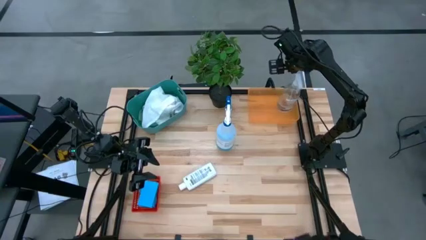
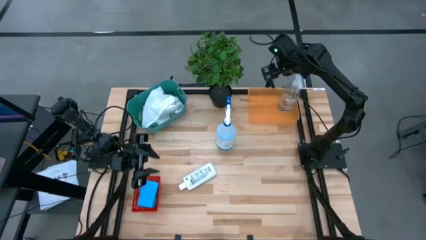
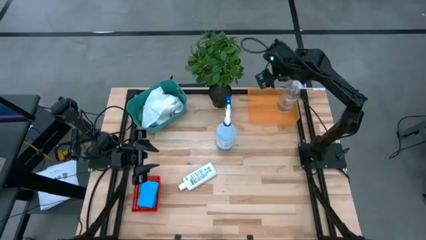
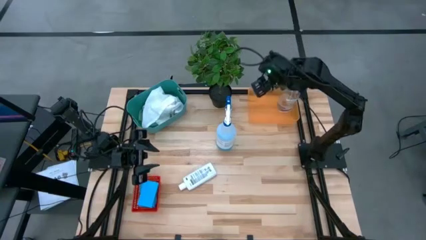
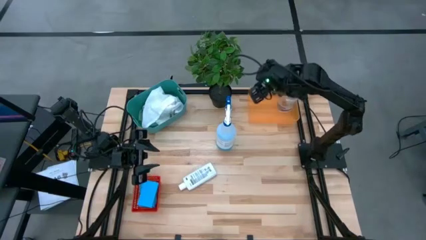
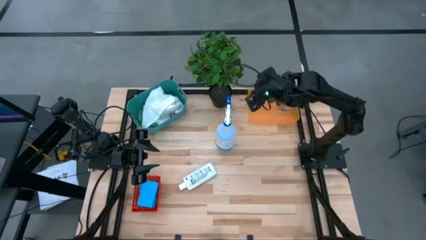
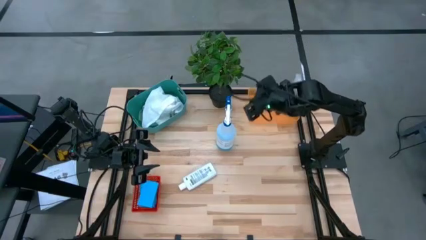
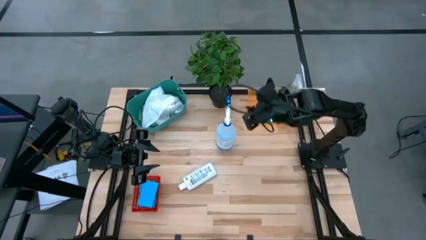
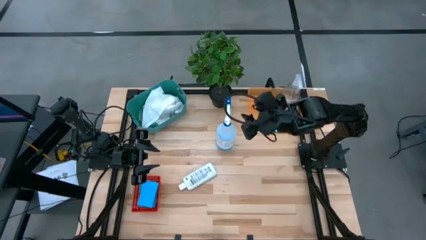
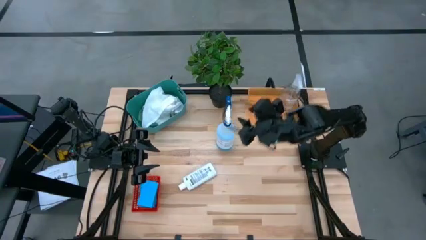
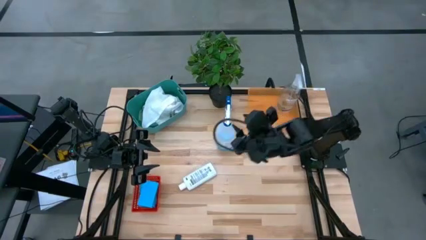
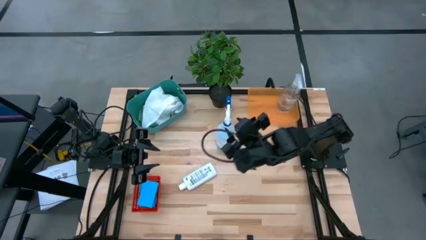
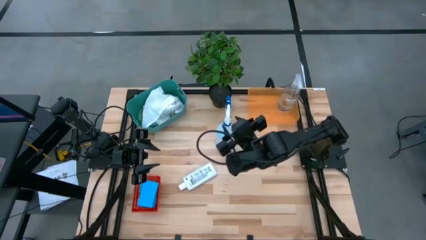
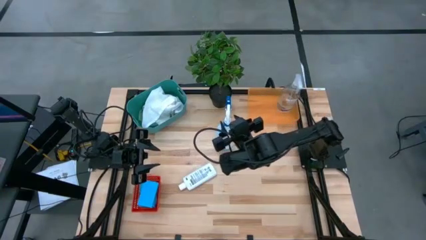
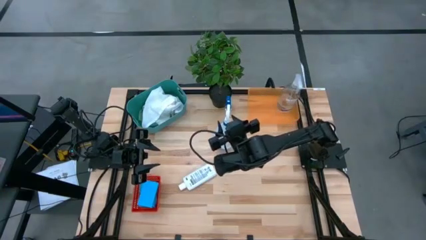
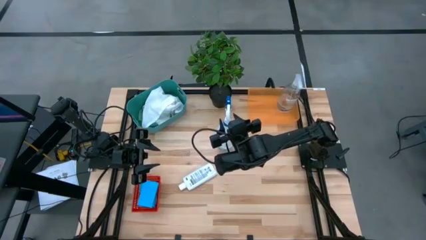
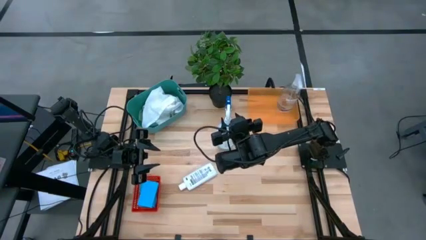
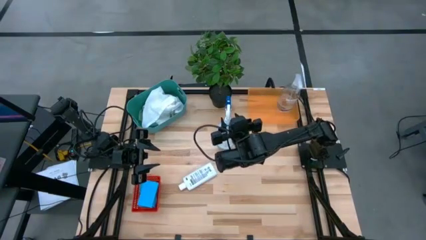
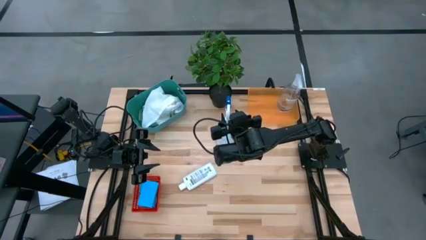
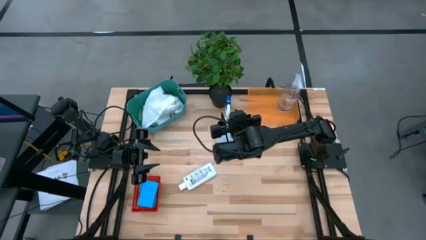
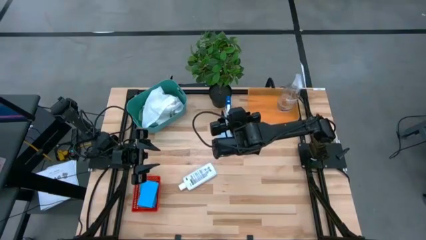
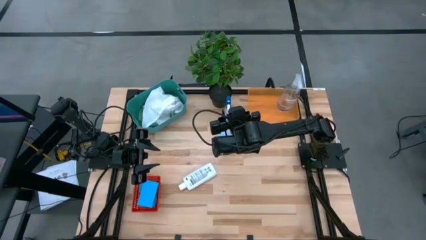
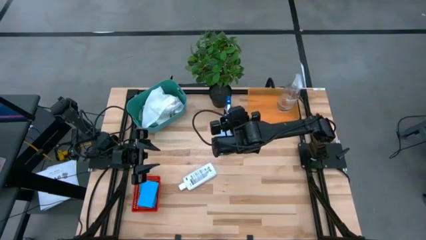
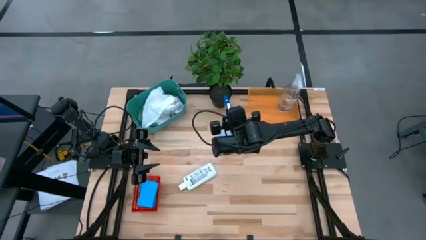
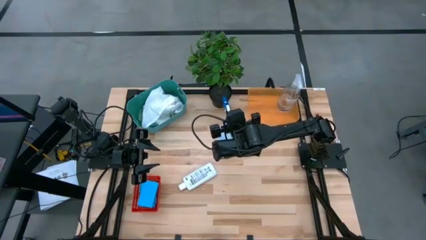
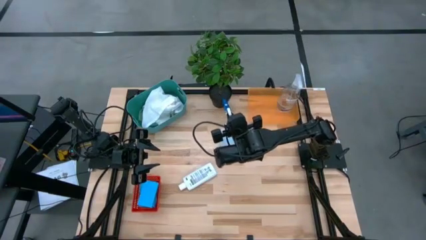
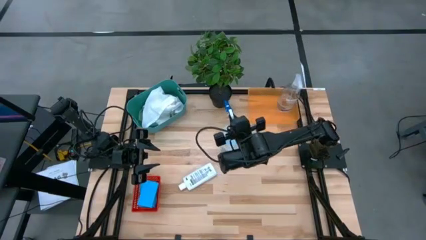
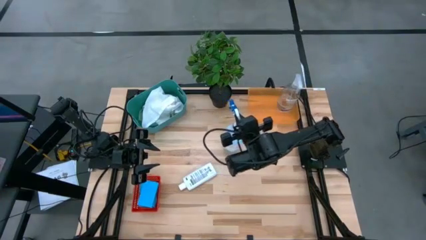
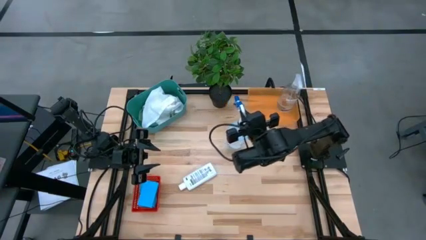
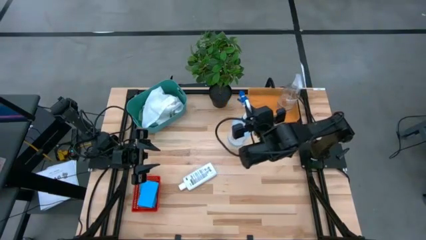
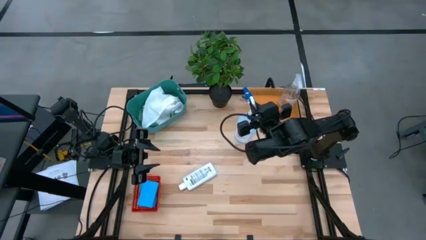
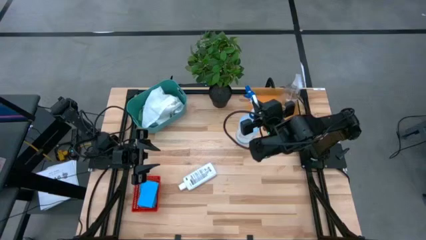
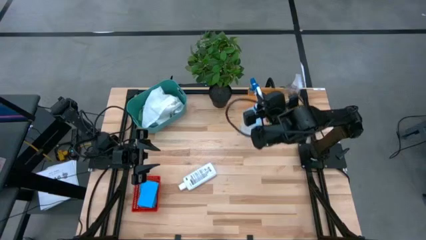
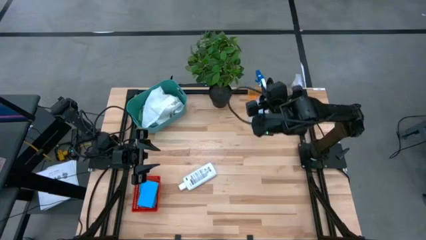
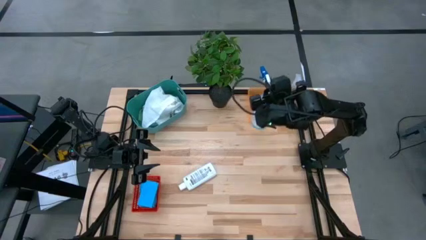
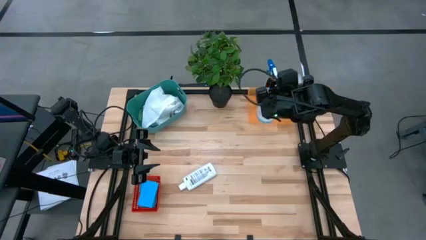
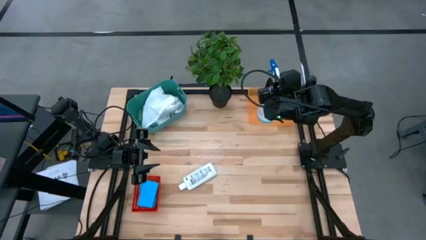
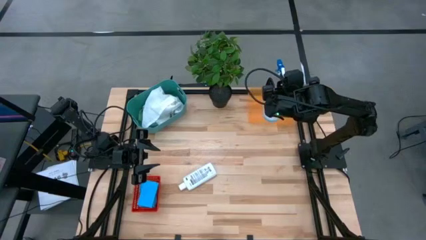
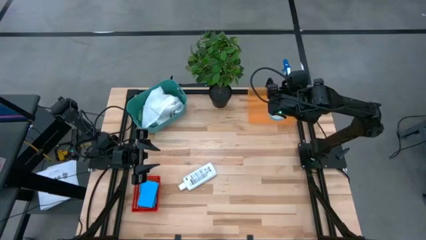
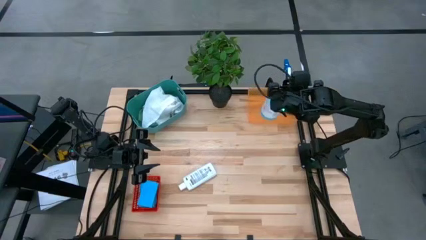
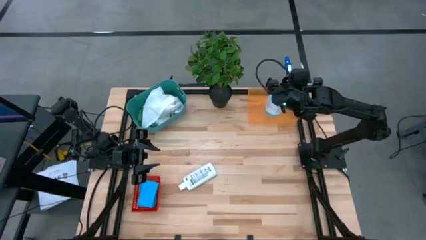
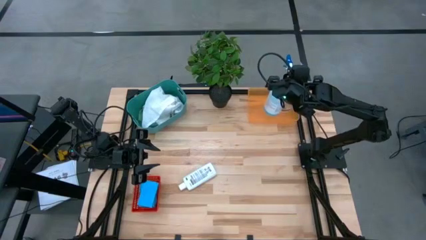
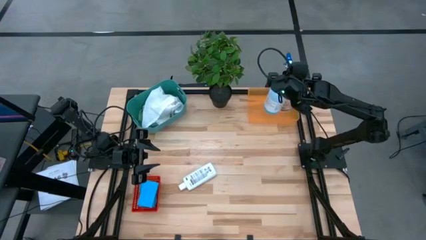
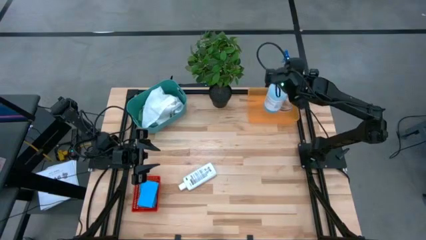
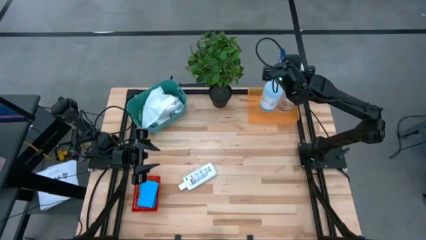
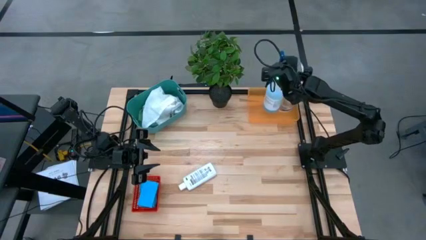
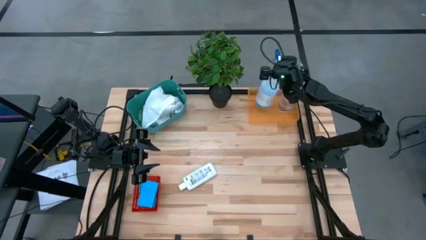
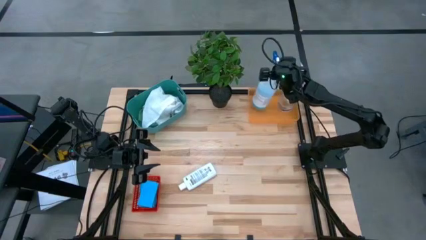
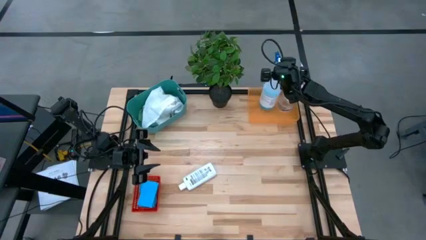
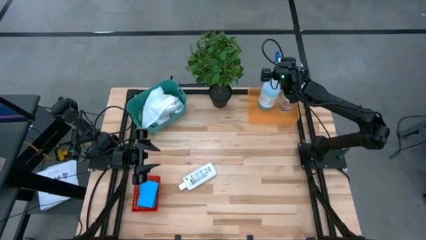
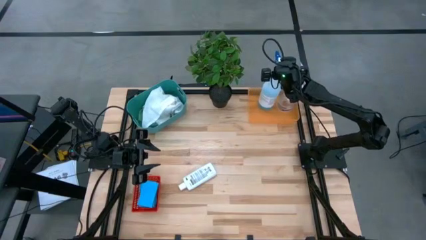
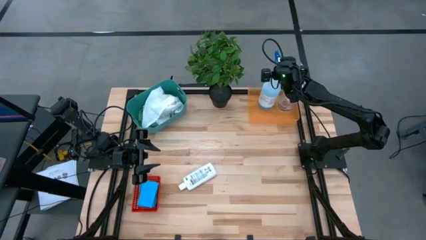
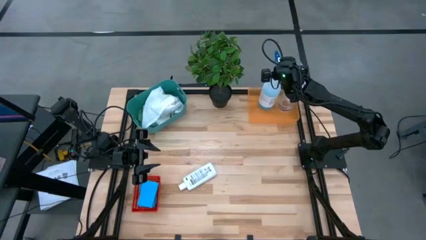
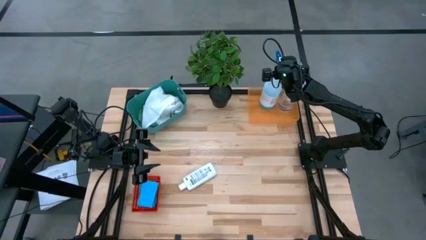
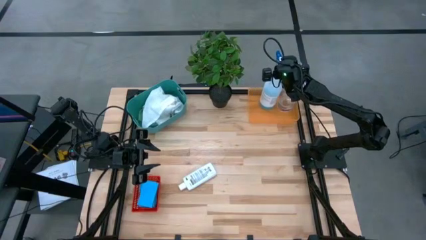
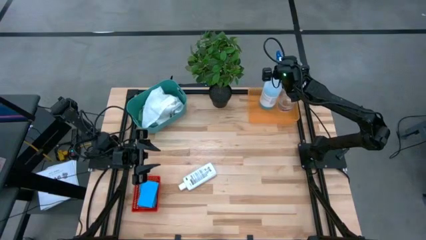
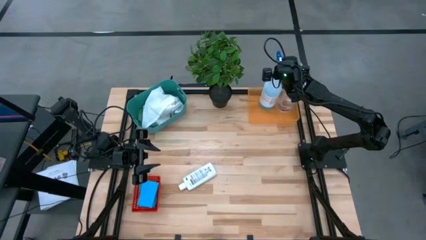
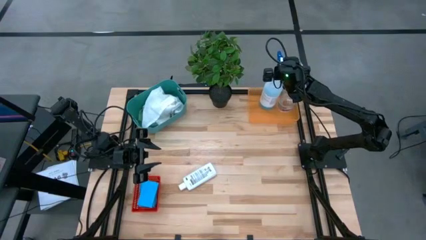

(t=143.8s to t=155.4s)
Task: Pick & Place Kitchen Items
Put the blue bottle into the orange bin

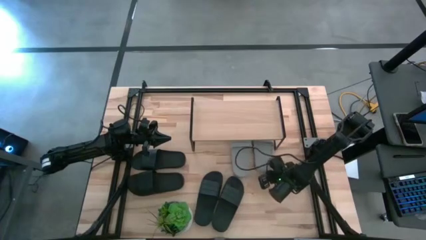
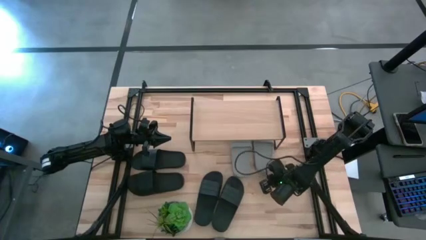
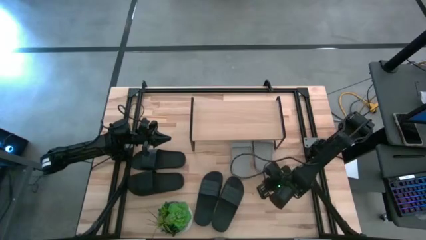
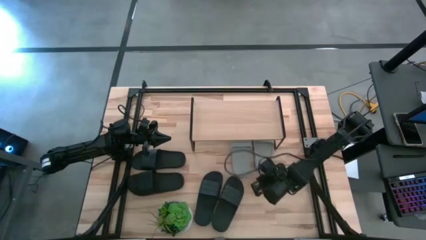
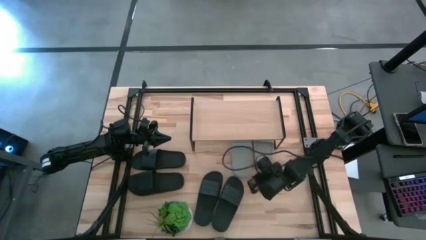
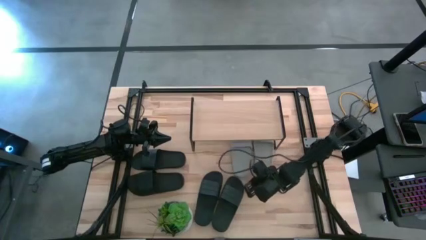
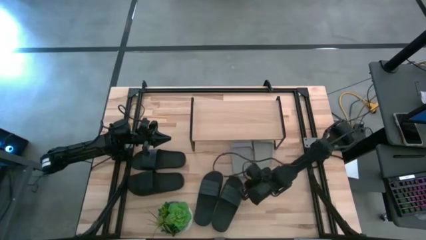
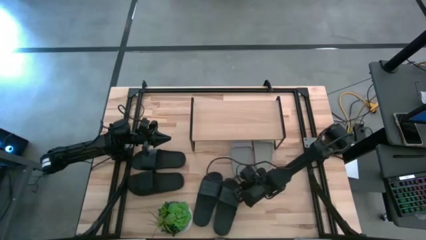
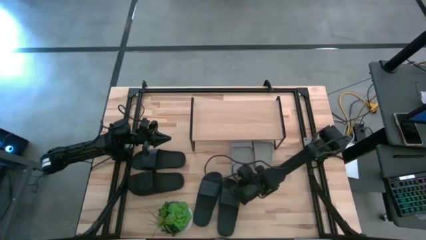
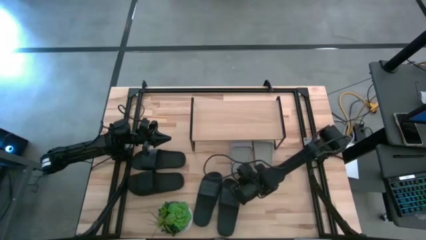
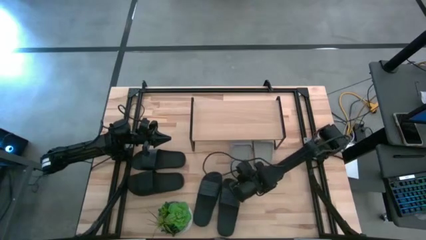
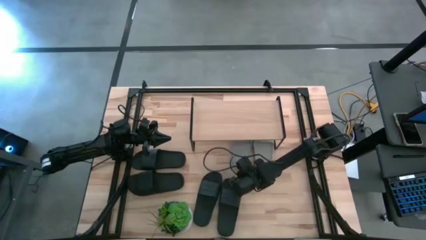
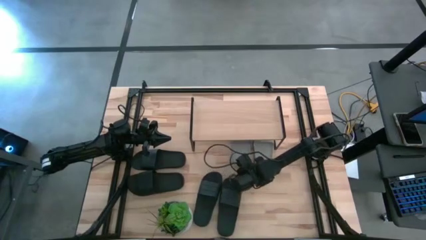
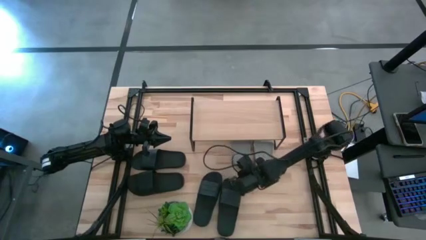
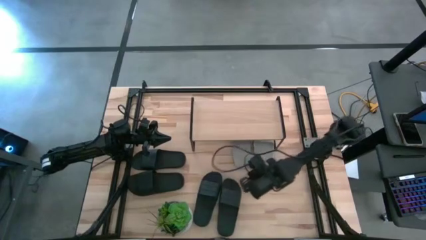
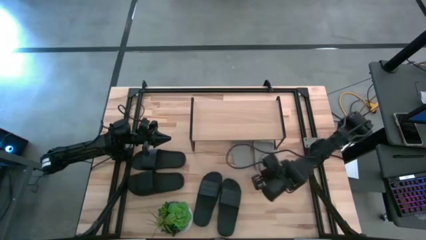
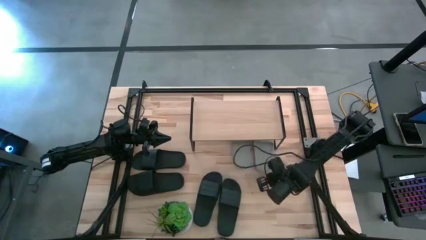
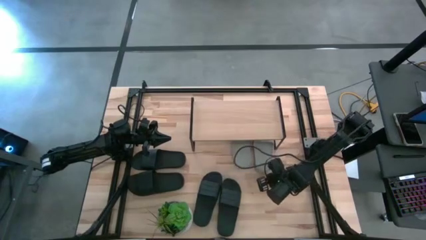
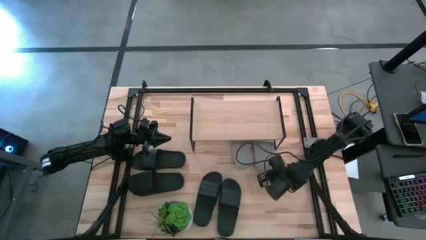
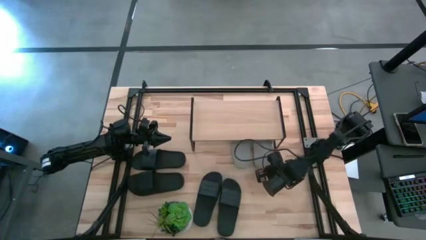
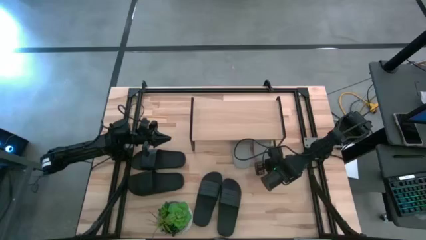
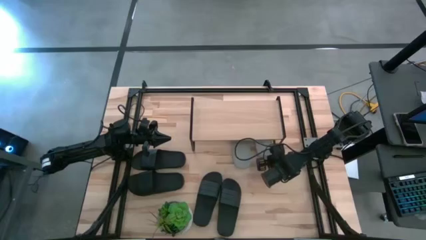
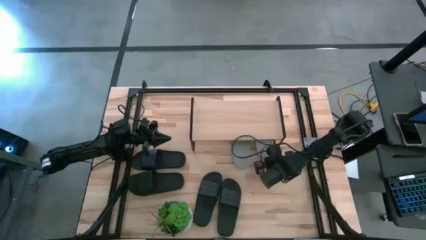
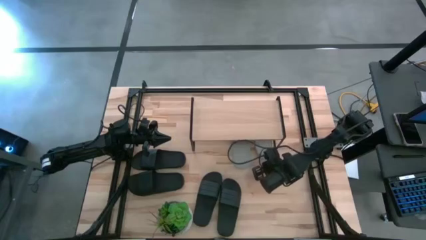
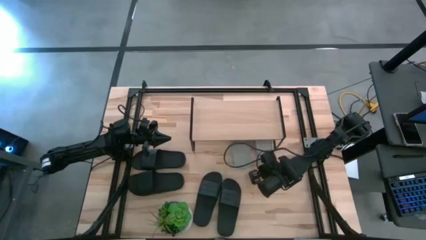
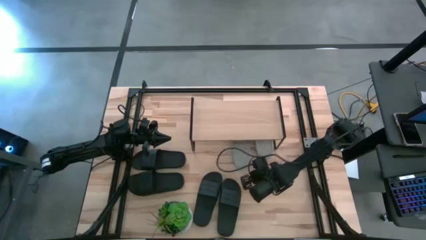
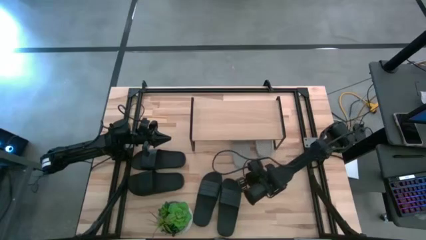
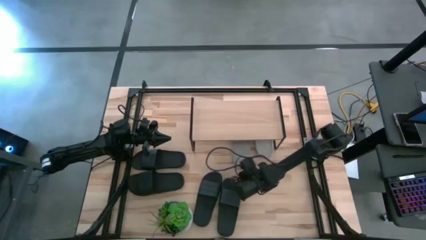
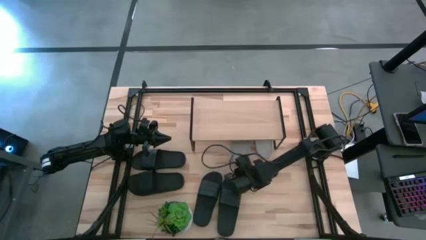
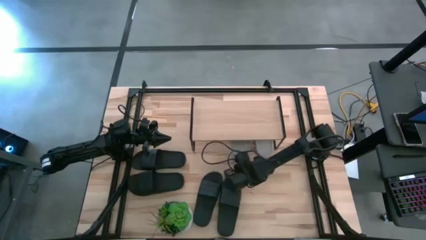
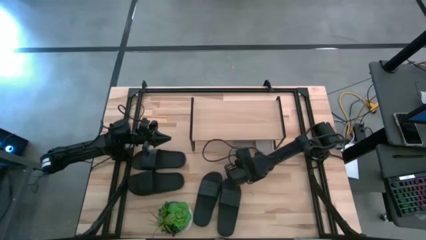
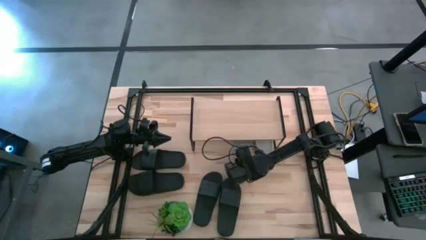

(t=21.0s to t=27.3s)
Task: Pick and place slides into the shelf
Adjust the gray slippers under the shelf
